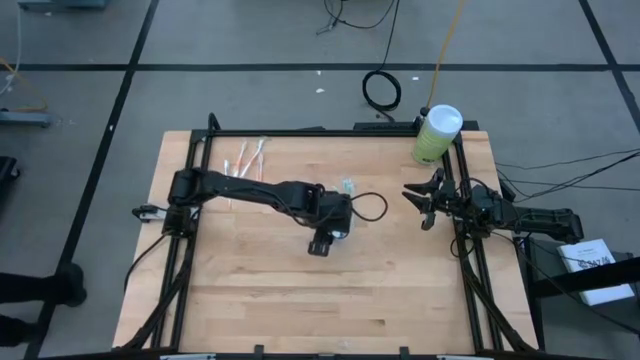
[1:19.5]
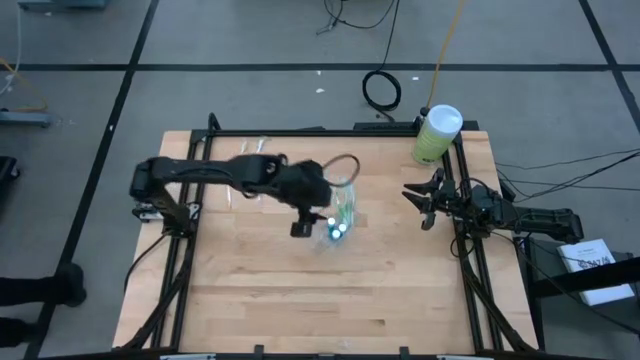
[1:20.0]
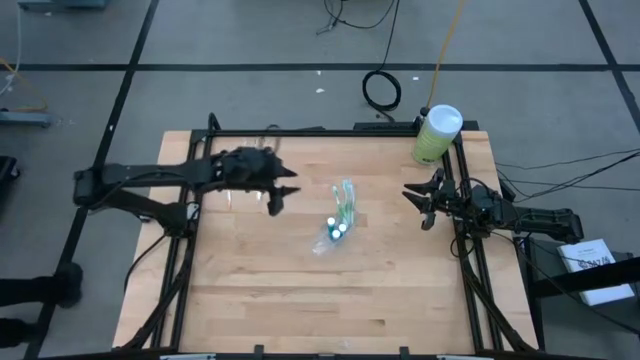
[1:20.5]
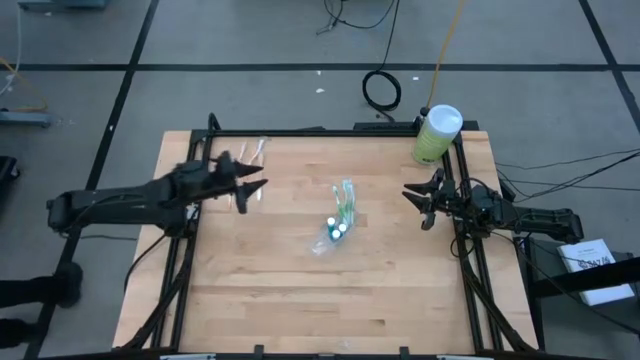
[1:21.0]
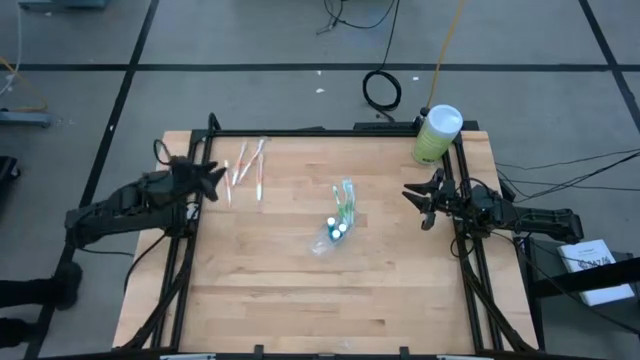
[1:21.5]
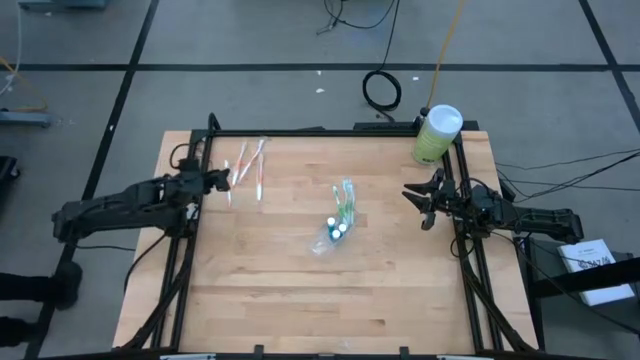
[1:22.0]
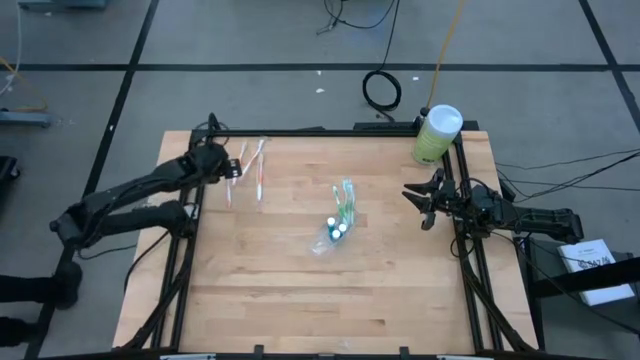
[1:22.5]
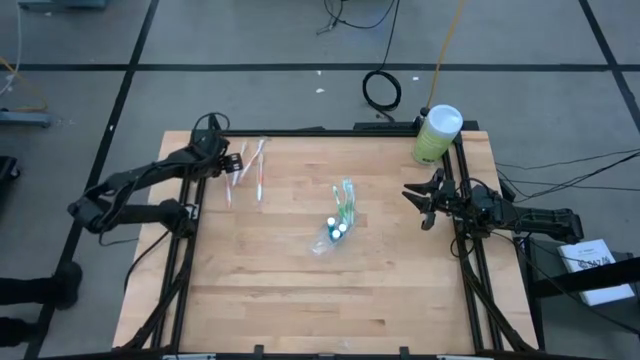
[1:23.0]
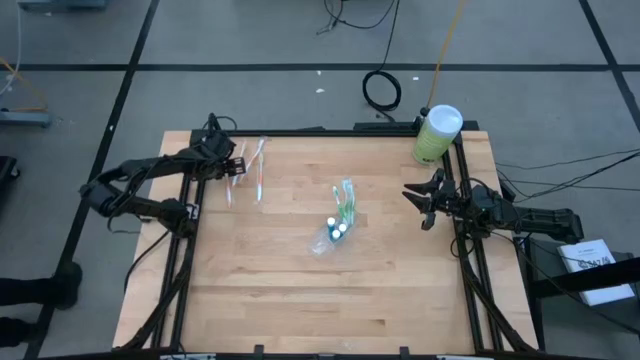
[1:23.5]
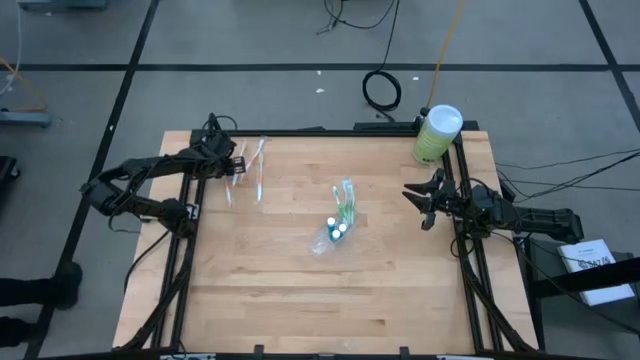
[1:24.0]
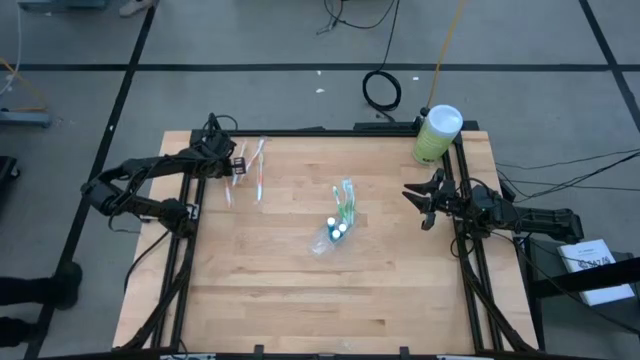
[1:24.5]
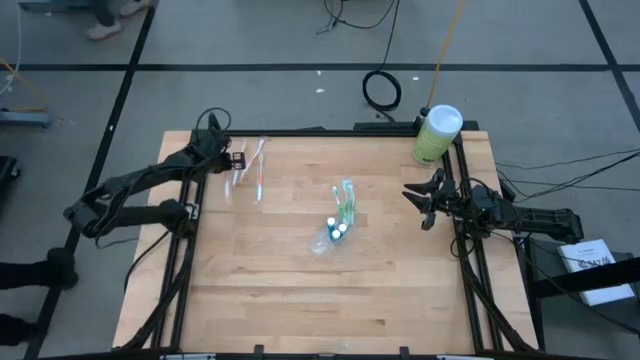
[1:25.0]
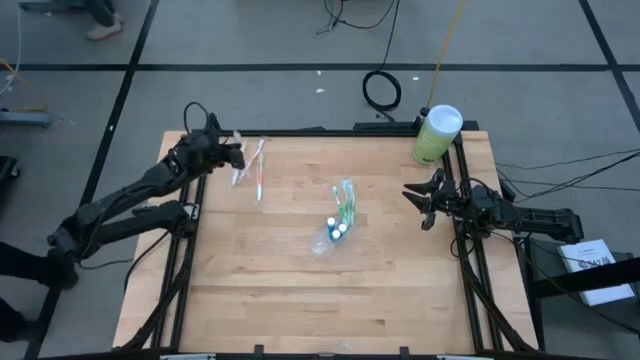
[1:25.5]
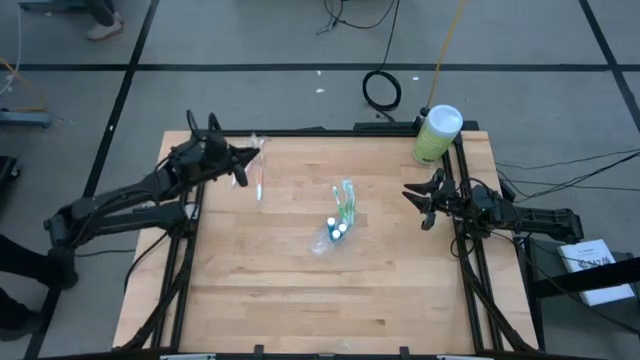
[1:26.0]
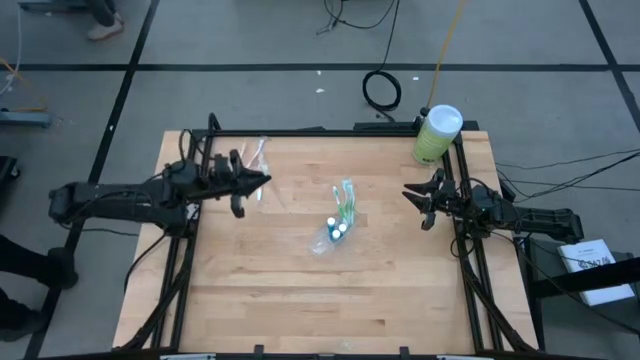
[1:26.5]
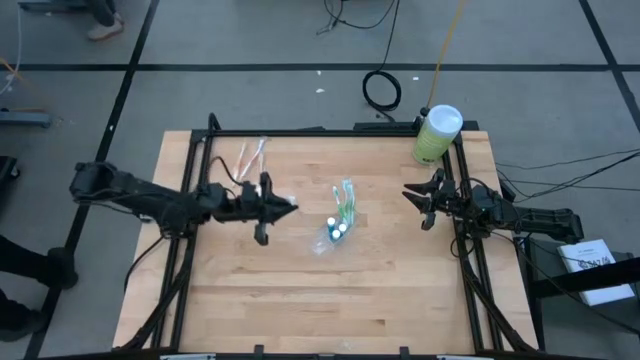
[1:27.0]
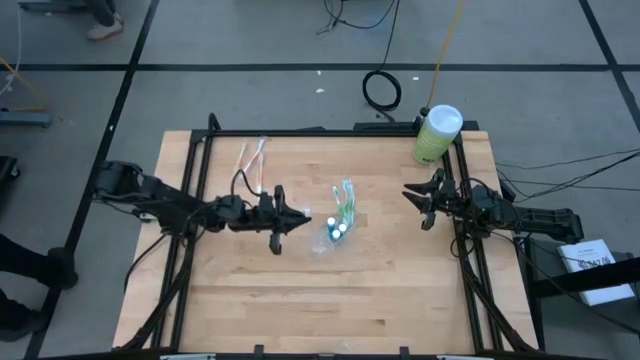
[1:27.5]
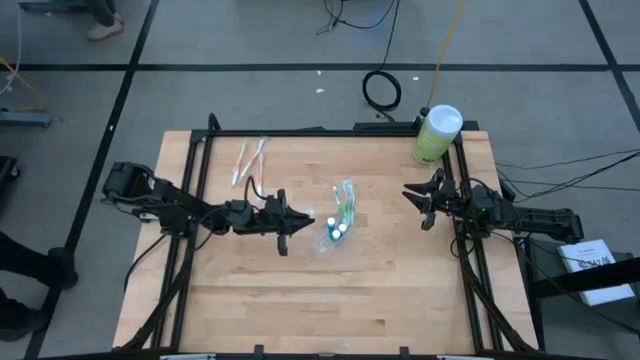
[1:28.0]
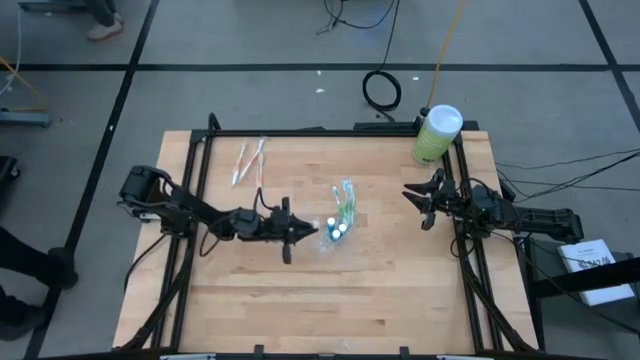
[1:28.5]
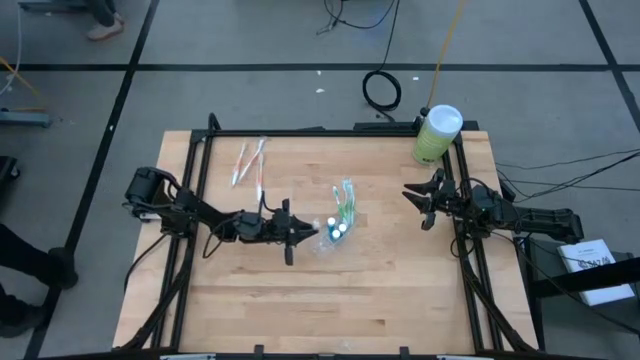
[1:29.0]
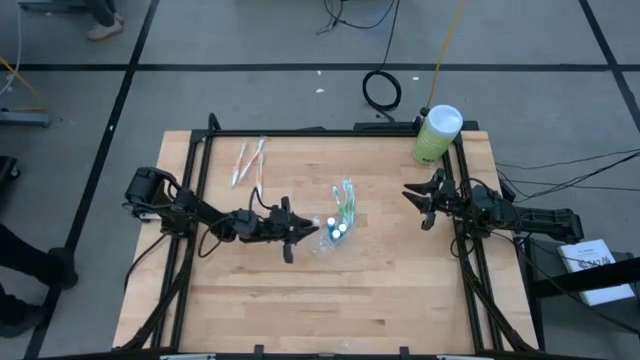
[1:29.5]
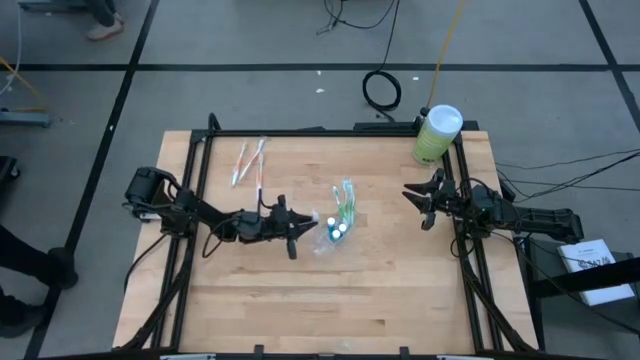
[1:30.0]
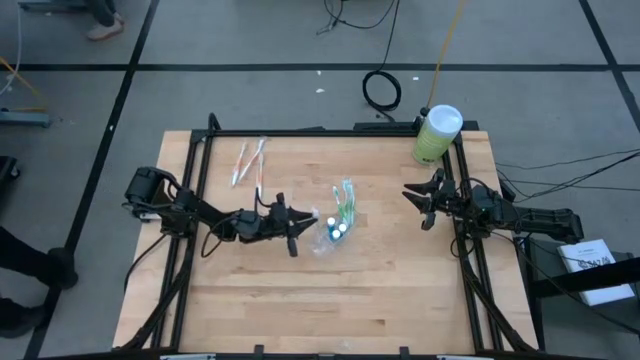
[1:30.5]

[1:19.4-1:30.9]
Task: Pick & Place toothbrushing station
Put the orange toothbrush into the transparent organizer

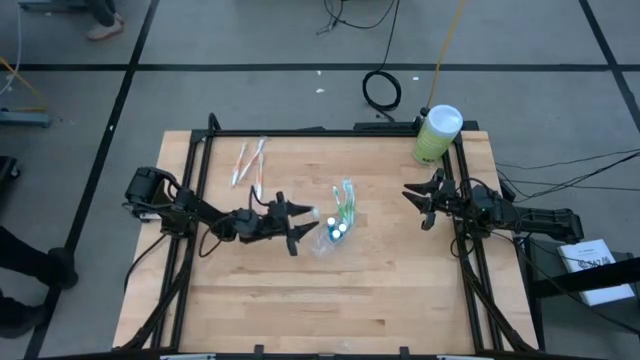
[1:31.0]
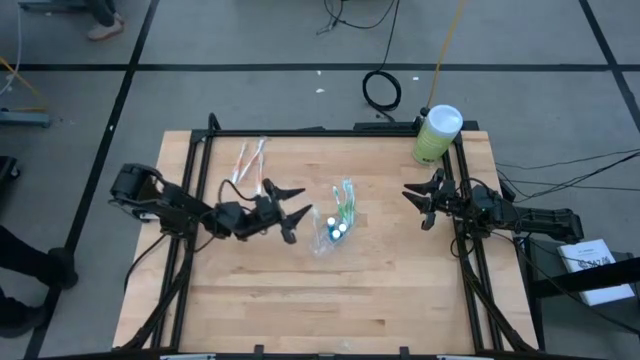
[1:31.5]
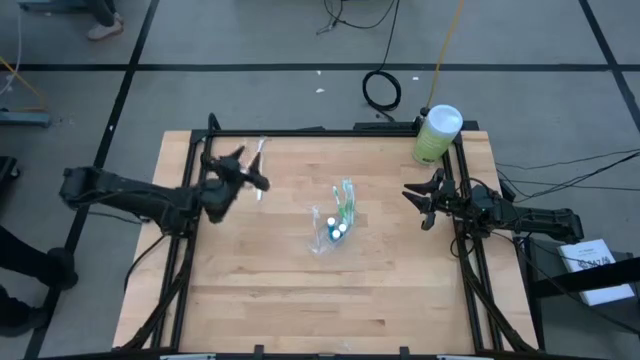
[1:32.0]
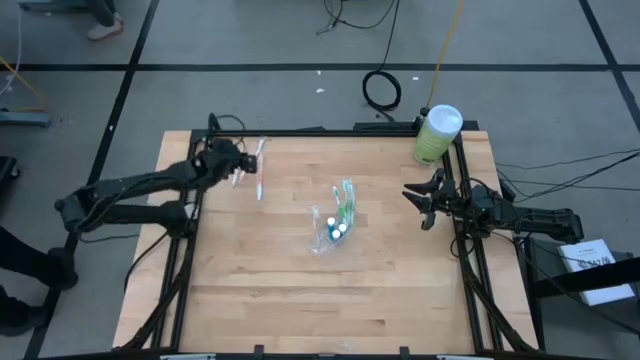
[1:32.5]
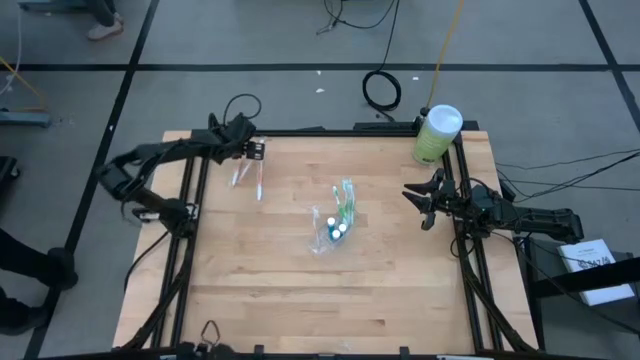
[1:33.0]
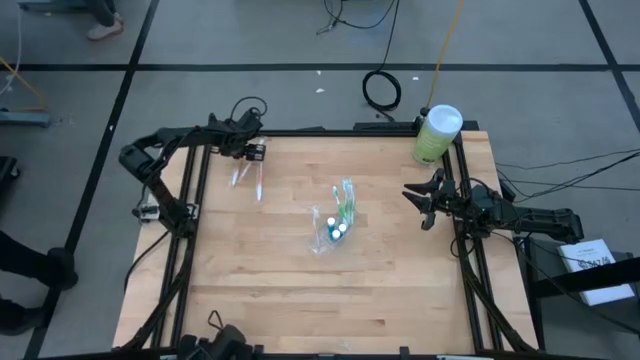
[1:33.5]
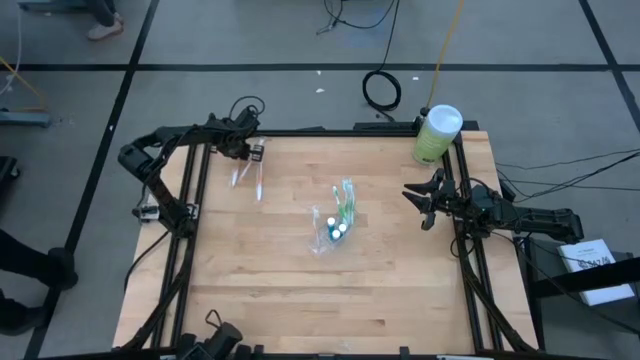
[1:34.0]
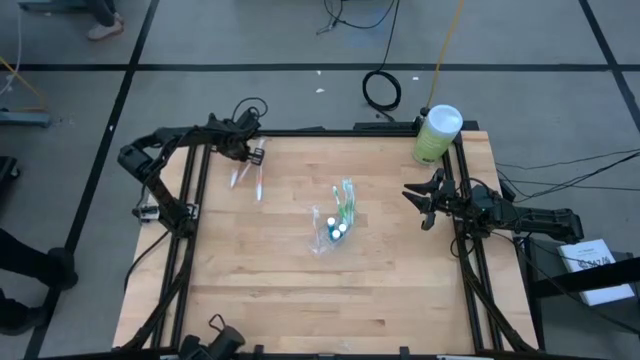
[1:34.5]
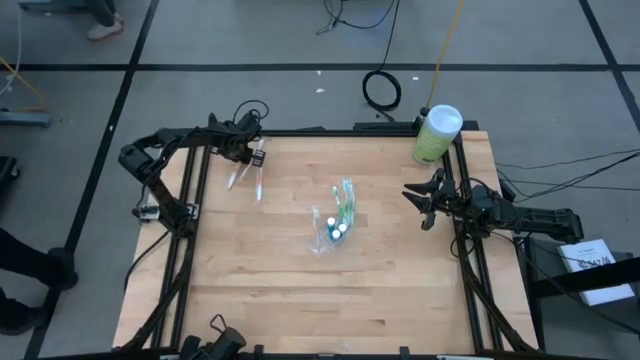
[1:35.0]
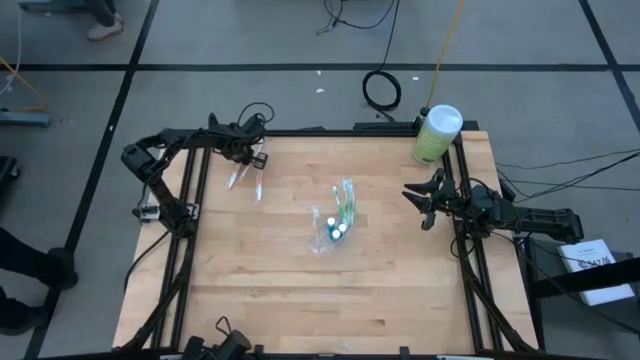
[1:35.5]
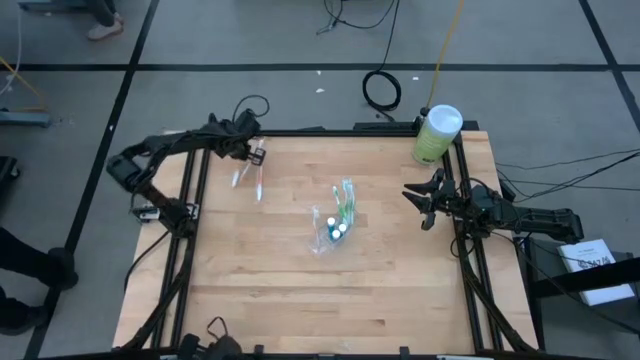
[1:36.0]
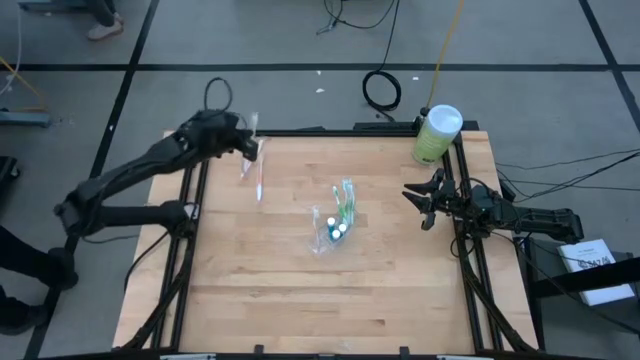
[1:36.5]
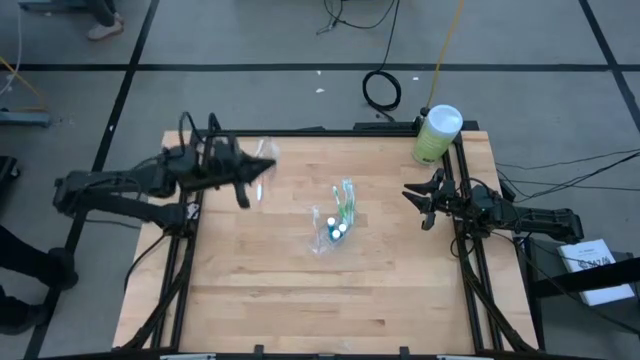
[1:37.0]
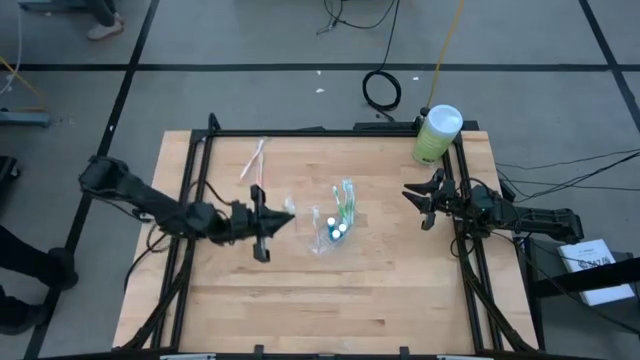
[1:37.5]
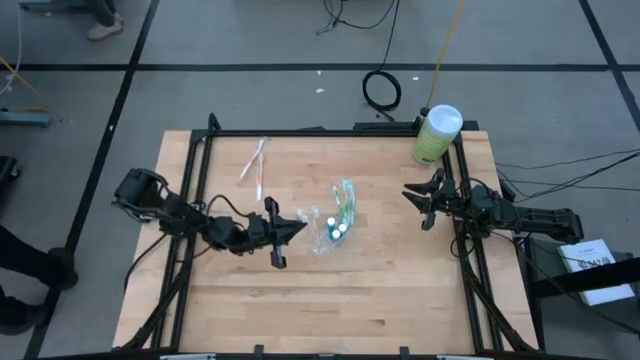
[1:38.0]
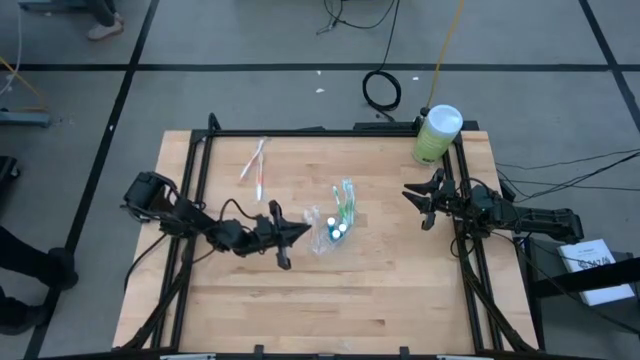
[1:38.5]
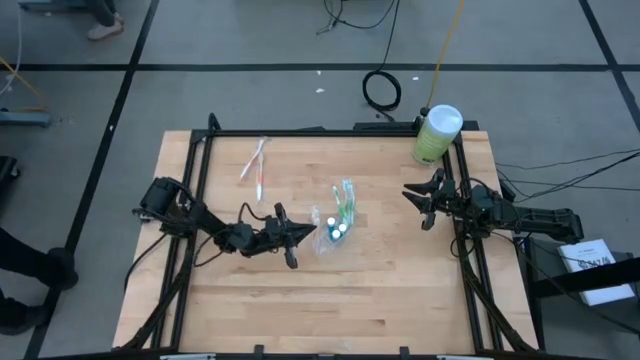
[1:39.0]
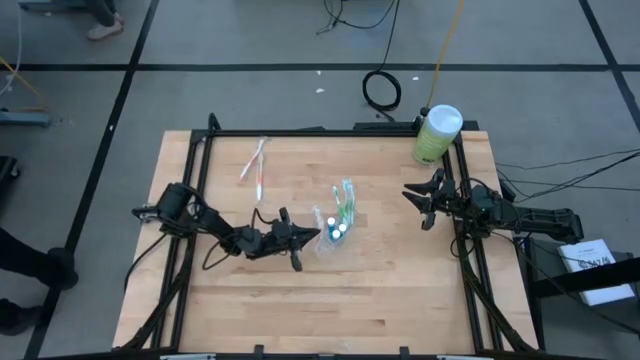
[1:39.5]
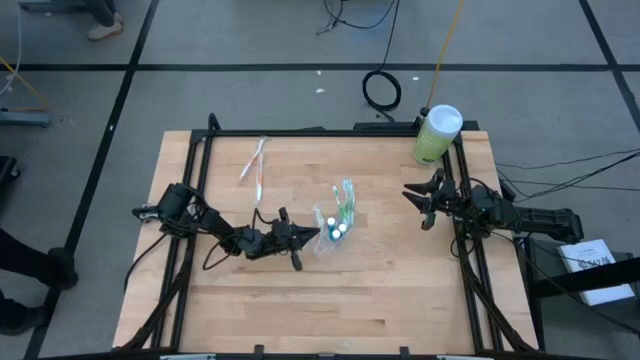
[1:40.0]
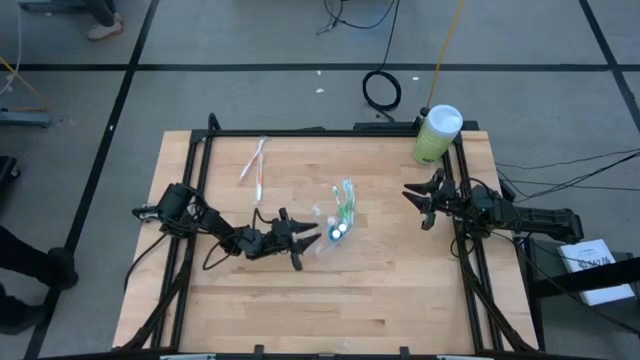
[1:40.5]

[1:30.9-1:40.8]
Put the orange toothbrush into the transparent organizer
